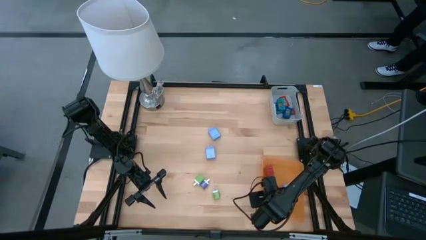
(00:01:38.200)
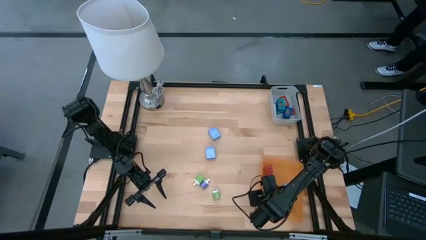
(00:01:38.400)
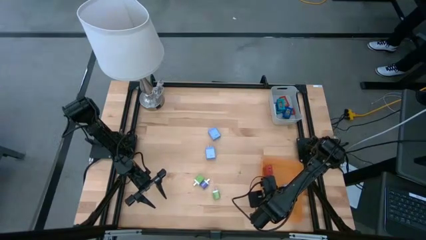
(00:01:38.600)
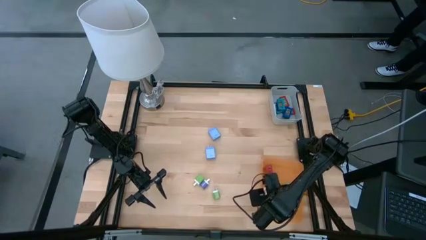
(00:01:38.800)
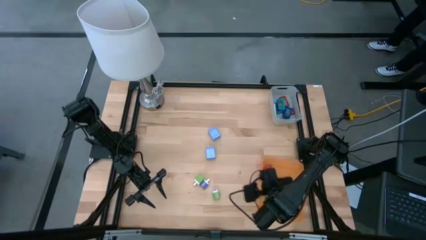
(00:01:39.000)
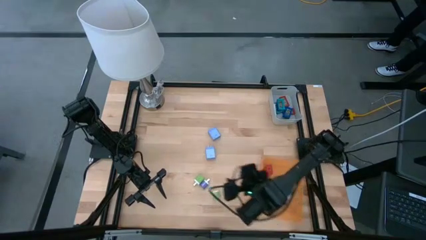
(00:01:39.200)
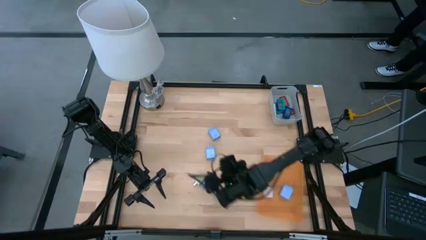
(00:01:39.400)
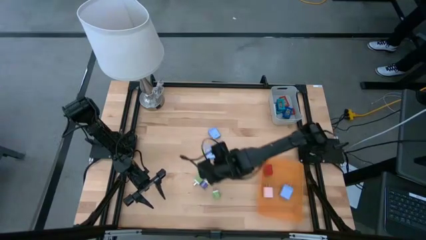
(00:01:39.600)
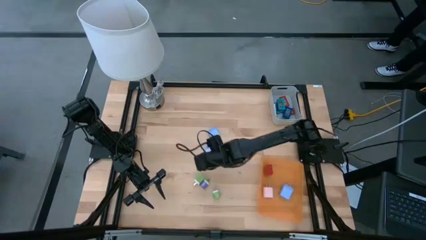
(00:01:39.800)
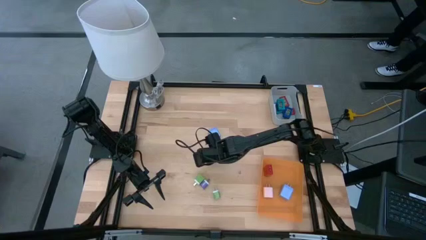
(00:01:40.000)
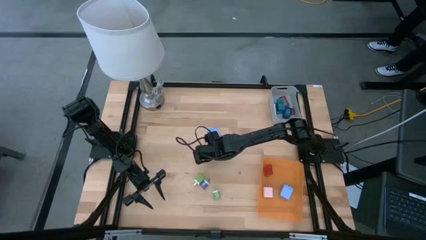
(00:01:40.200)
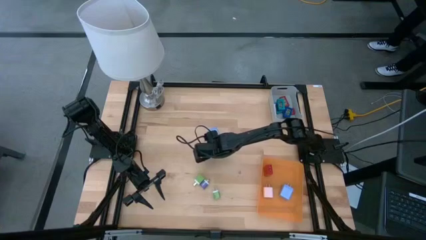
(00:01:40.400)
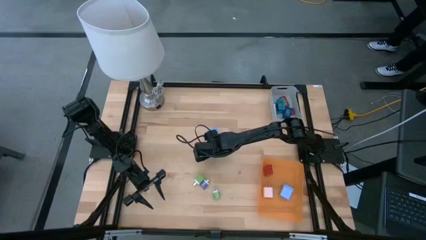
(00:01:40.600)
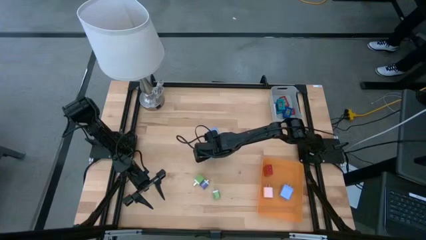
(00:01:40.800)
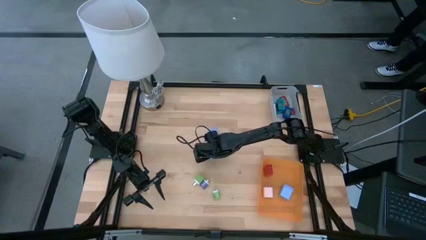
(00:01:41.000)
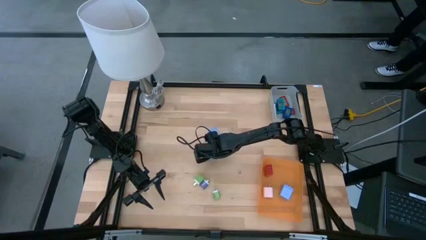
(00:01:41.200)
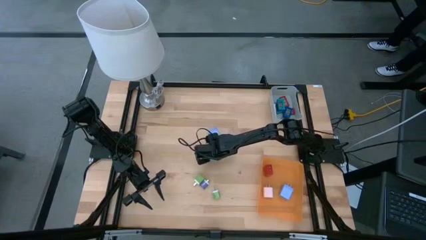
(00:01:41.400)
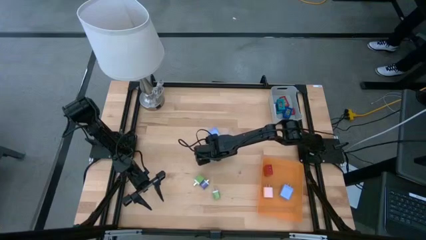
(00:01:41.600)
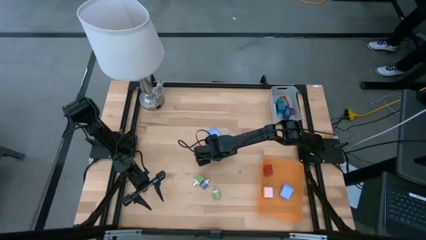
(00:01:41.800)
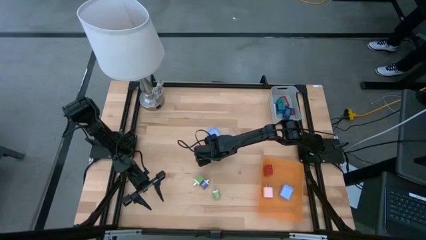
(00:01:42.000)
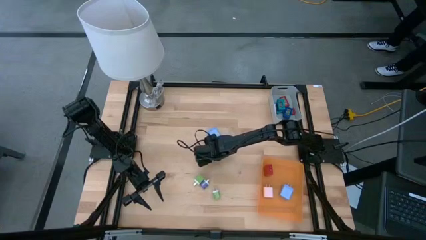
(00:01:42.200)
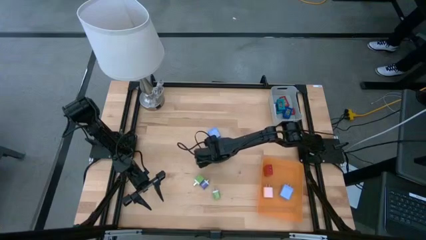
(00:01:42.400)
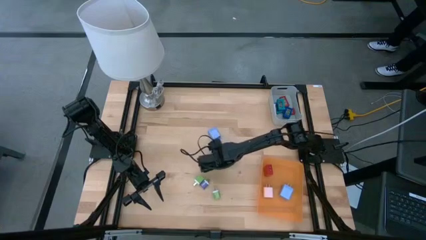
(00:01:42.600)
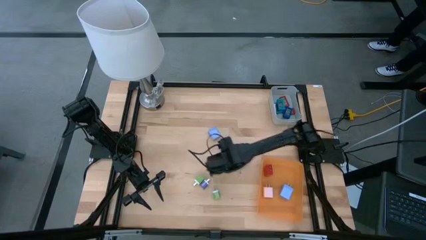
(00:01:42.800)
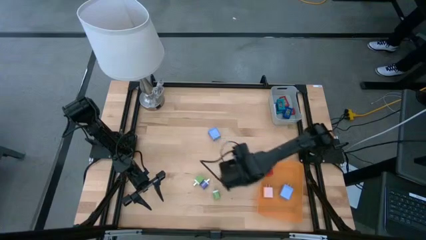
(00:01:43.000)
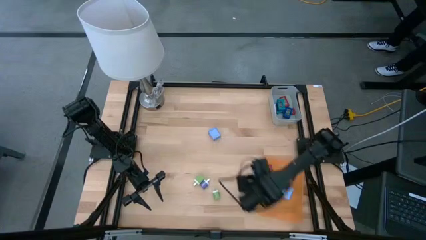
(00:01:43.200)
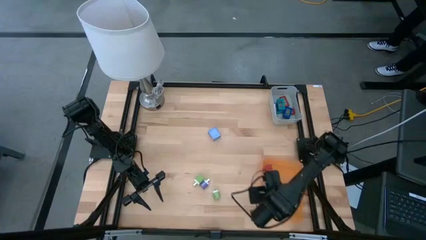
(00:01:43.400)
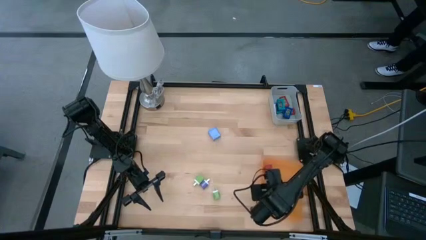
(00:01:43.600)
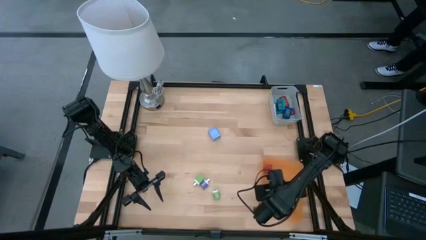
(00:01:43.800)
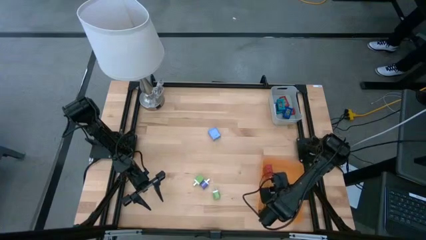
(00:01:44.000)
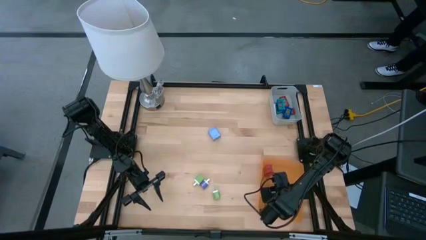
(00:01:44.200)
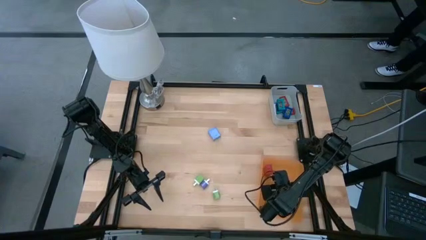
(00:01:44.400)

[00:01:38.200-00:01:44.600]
Task: Pick & Place Office items
Put the bottom blue charger adapter into the orange bin

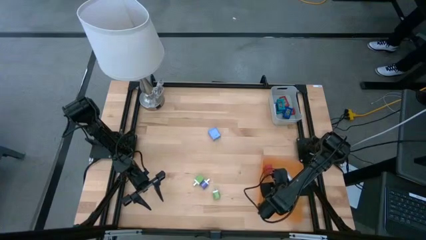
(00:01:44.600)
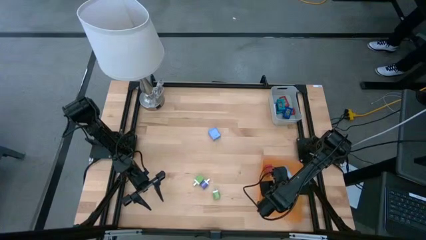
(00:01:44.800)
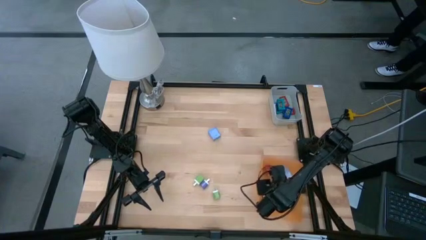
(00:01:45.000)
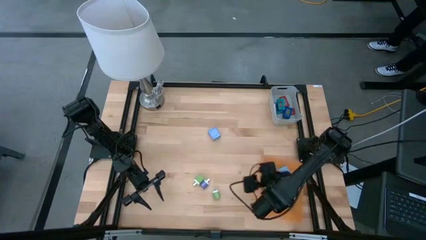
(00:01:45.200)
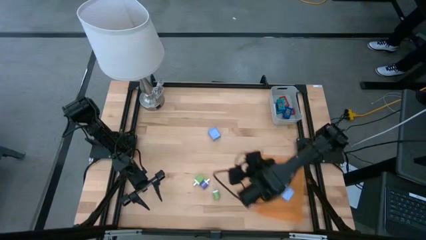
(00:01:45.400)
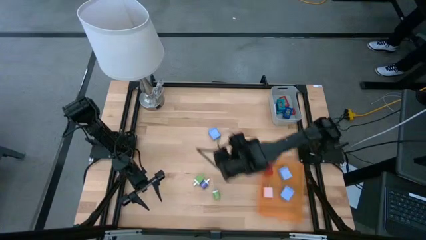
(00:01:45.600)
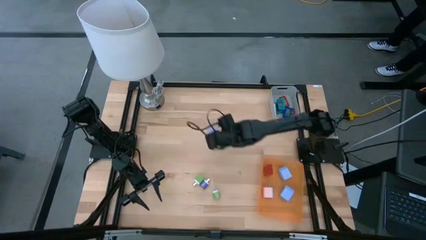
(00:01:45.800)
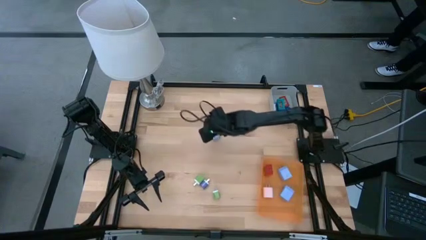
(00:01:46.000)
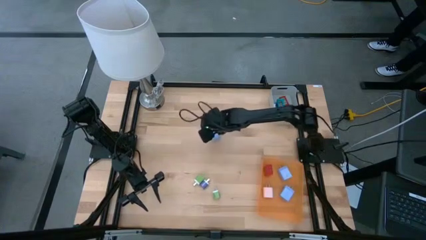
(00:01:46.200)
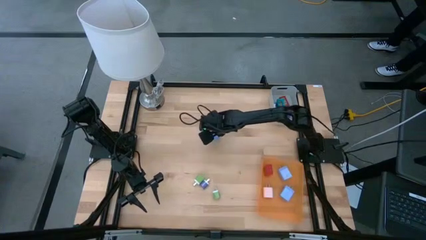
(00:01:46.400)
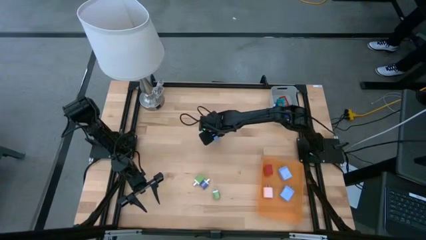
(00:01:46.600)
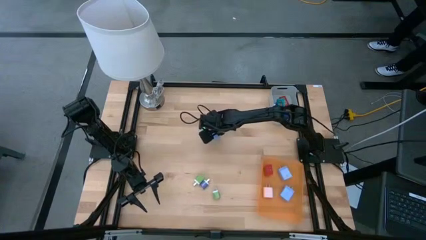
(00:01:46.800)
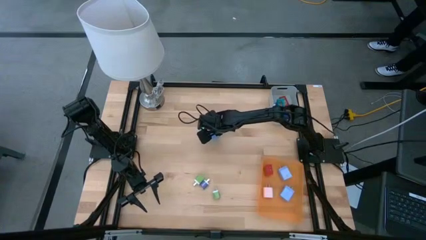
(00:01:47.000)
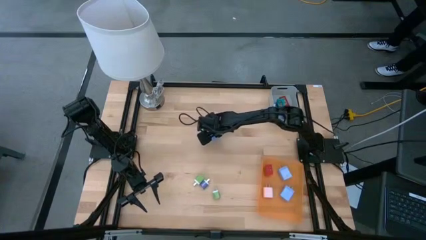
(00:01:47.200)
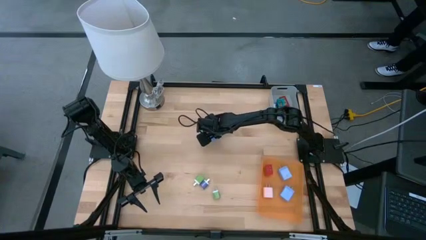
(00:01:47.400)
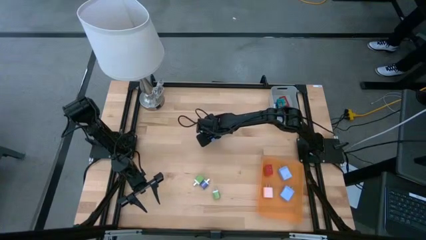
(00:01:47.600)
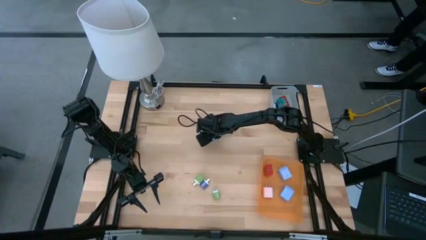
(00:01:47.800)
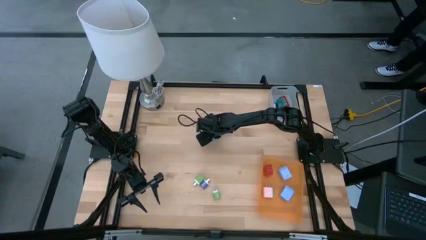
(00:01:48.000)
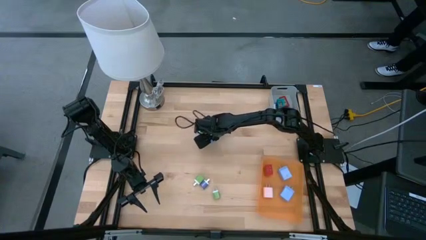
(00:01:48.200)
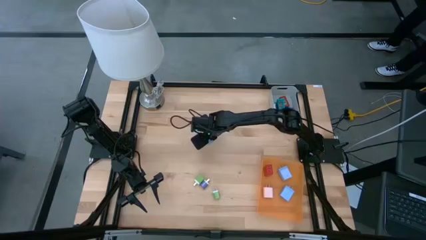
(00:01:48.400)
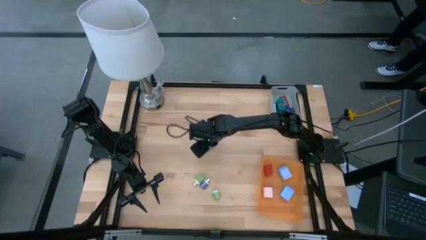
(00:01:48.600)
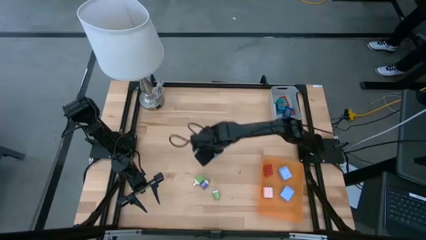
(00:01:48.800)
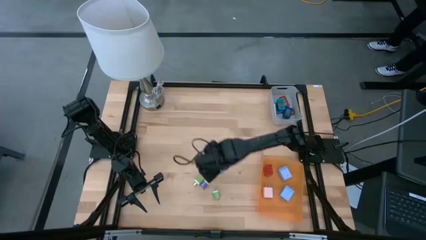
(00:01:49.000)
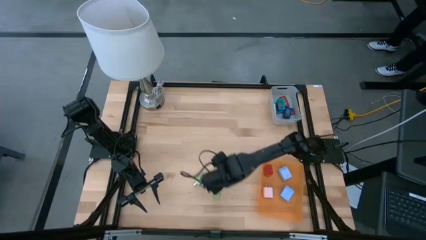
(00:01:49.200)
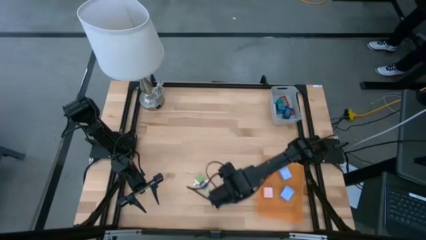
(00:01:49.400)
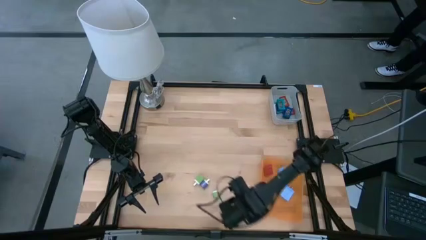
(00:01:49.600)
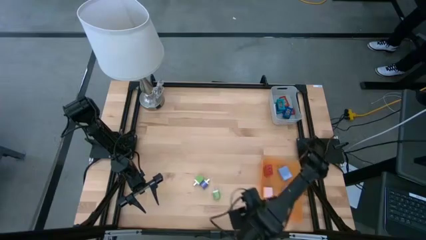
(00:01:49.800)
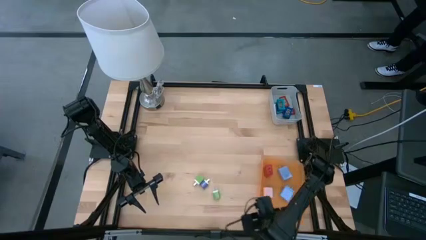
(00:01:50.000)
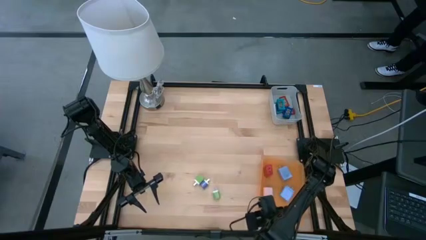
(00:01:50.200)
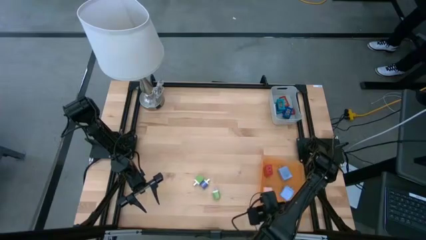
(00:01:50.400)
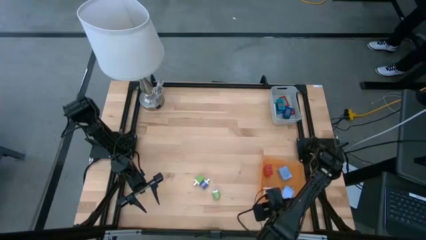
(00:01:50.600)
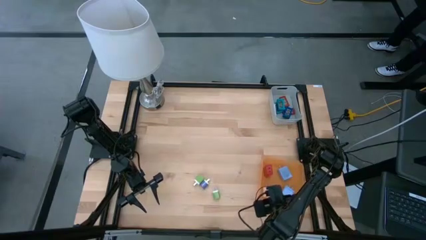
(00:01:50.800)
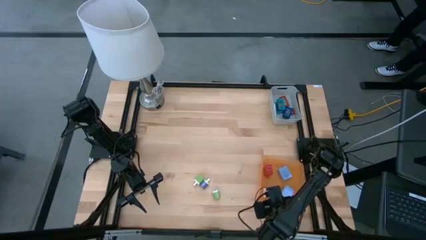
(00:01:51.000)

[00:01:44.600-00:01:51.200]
Put the blue charger adapter into the orange bin
